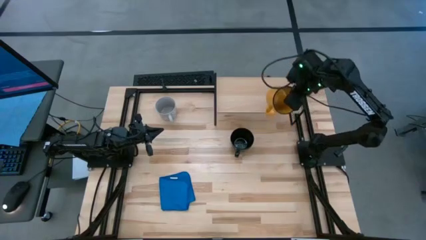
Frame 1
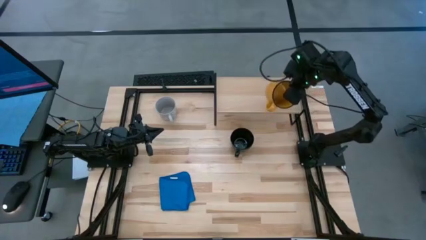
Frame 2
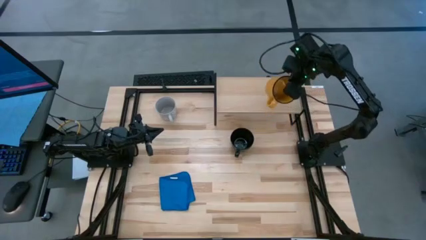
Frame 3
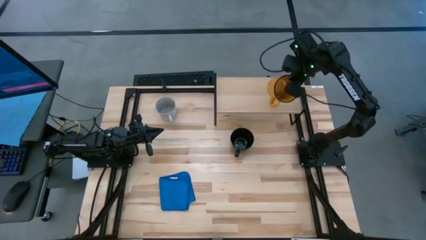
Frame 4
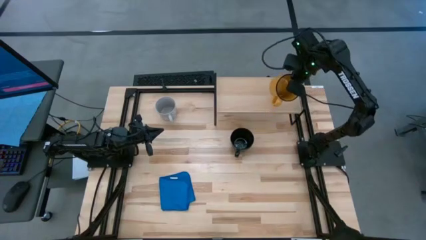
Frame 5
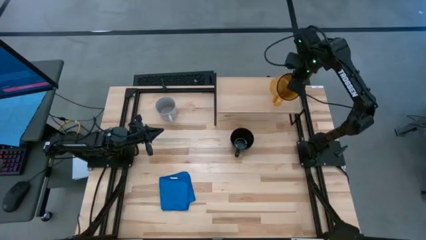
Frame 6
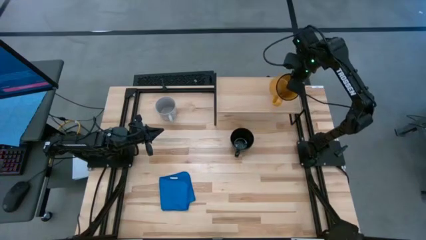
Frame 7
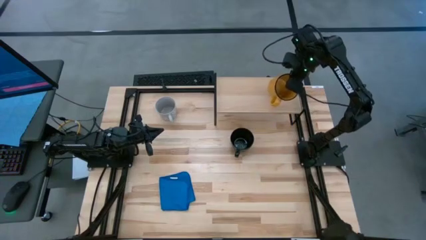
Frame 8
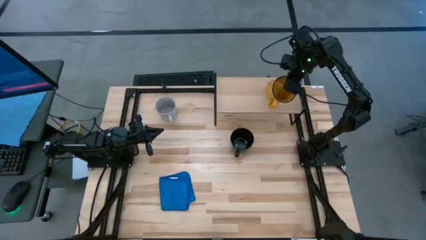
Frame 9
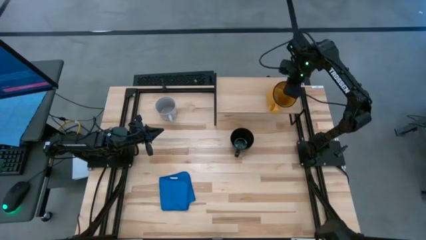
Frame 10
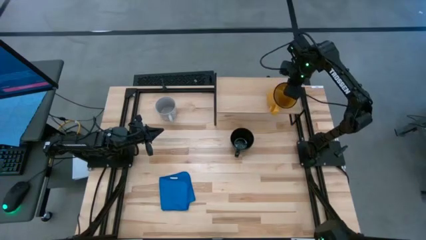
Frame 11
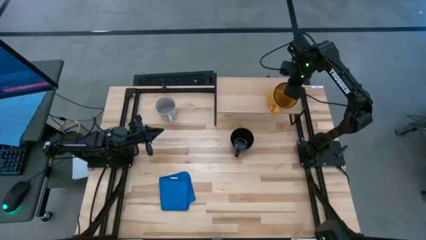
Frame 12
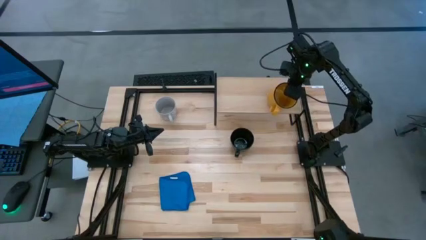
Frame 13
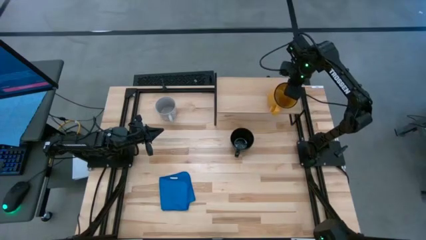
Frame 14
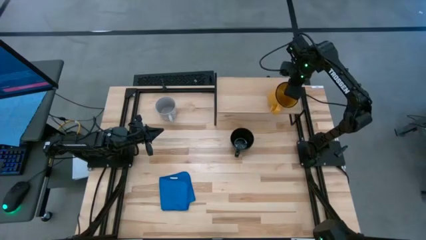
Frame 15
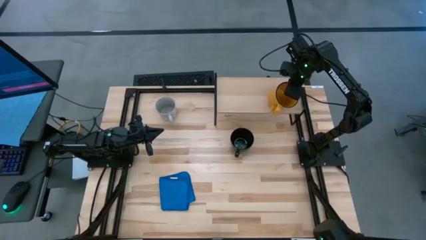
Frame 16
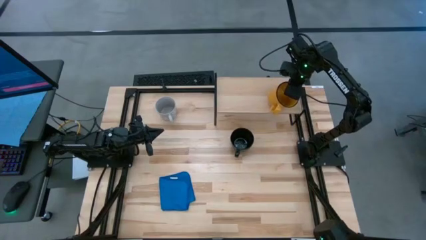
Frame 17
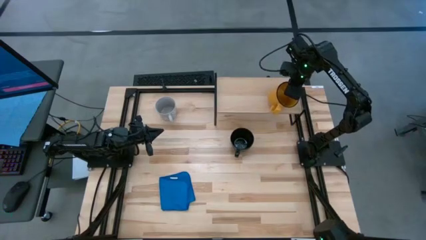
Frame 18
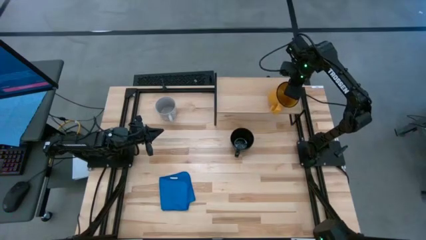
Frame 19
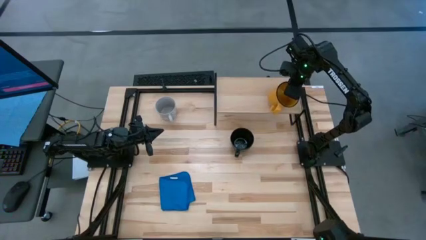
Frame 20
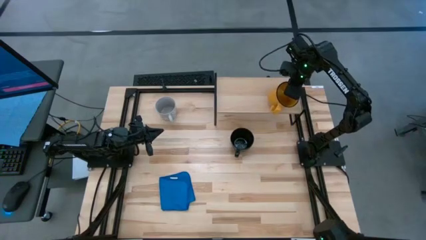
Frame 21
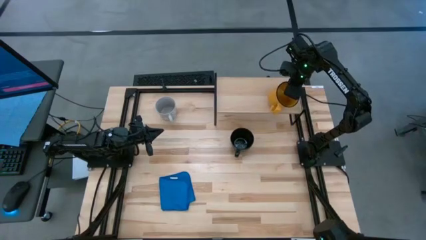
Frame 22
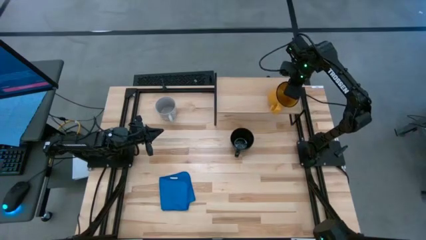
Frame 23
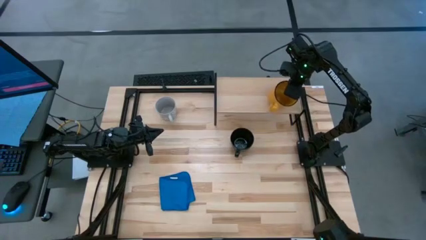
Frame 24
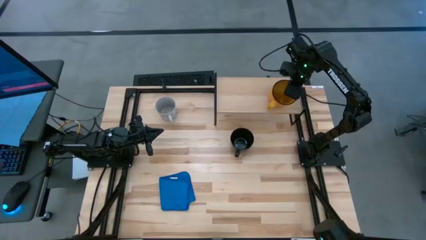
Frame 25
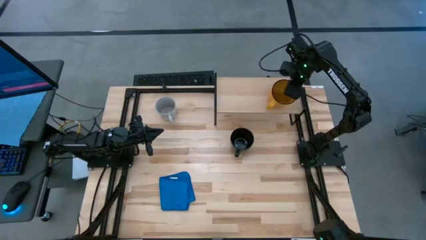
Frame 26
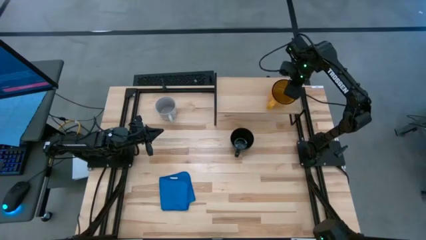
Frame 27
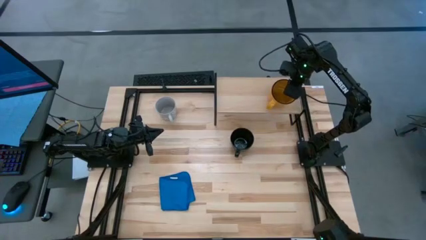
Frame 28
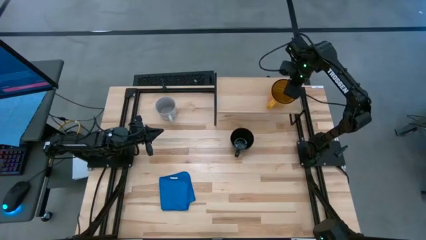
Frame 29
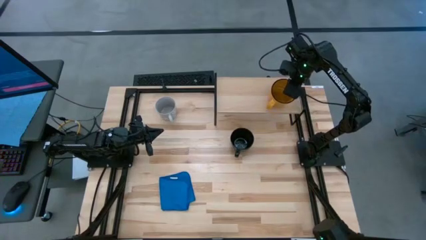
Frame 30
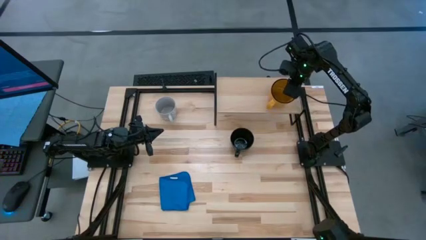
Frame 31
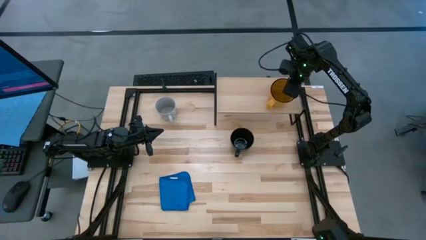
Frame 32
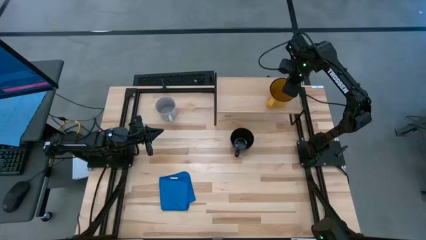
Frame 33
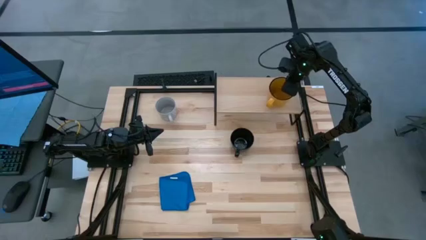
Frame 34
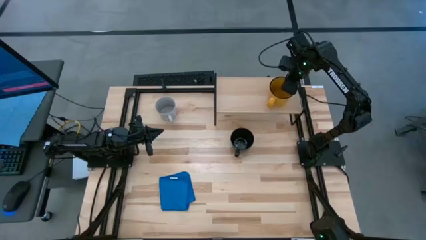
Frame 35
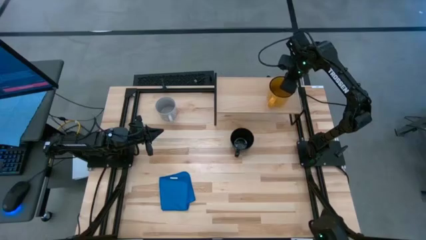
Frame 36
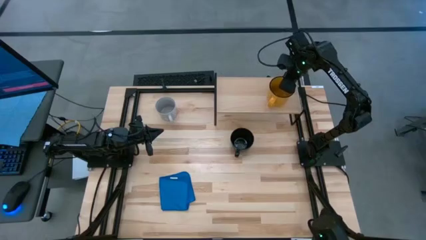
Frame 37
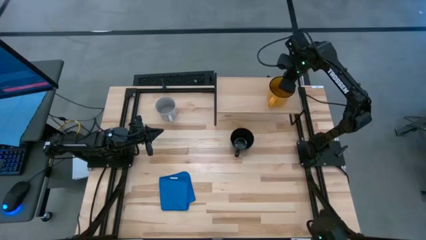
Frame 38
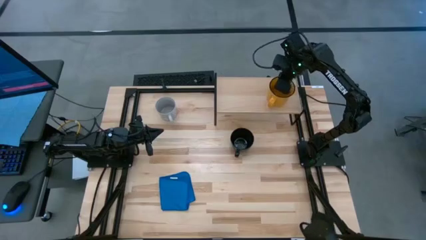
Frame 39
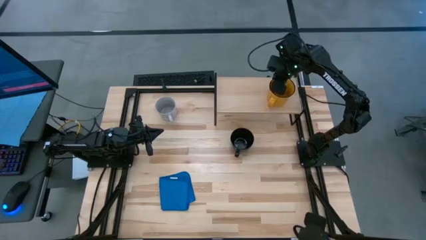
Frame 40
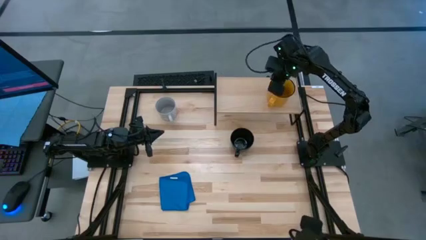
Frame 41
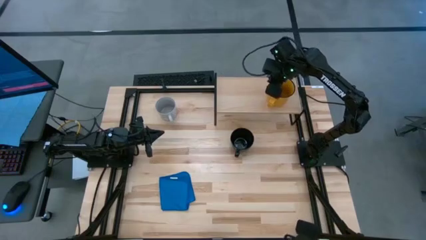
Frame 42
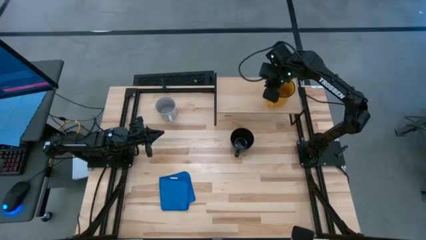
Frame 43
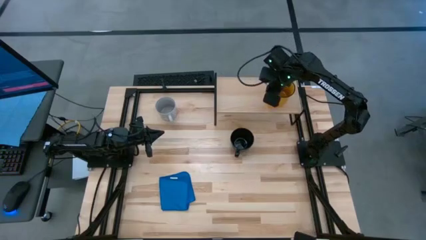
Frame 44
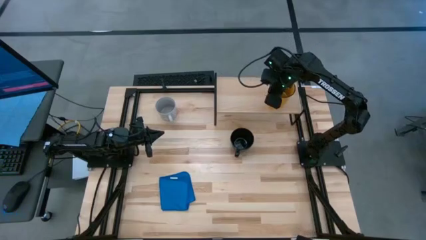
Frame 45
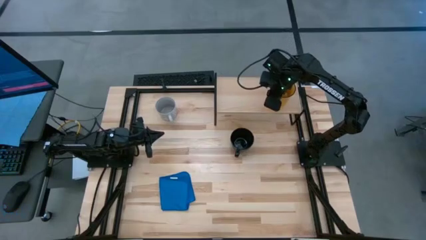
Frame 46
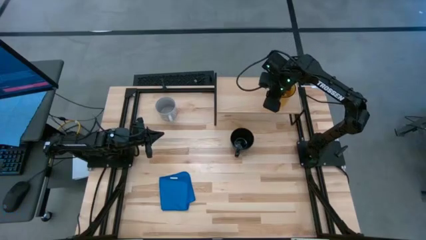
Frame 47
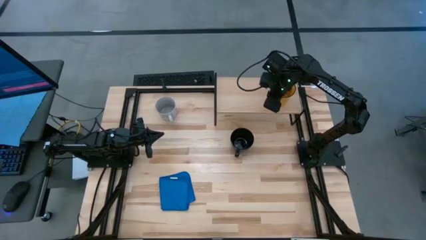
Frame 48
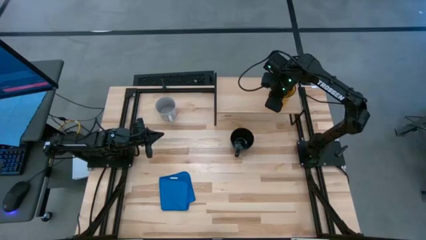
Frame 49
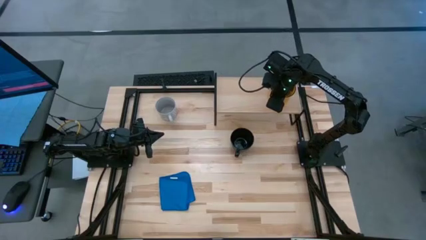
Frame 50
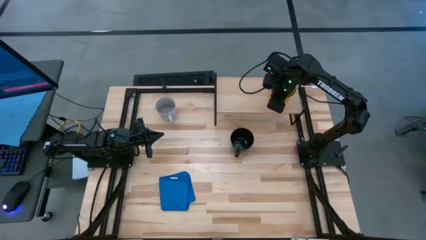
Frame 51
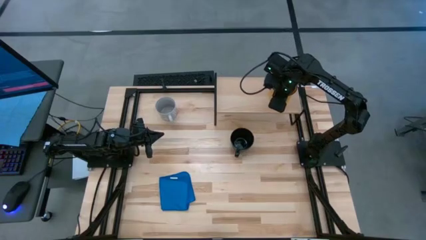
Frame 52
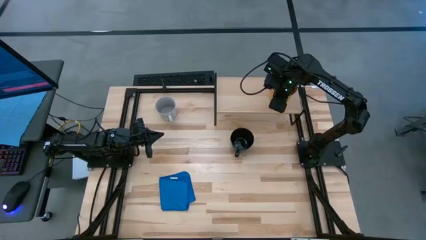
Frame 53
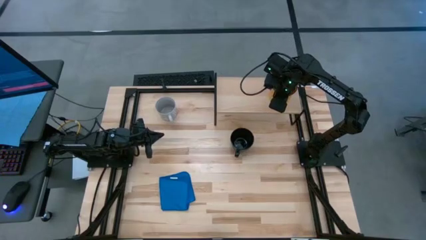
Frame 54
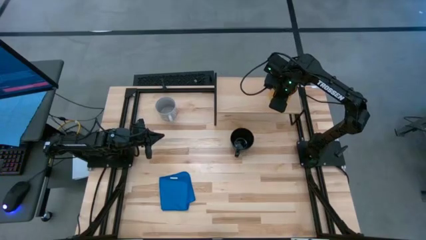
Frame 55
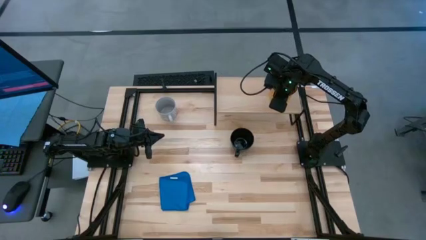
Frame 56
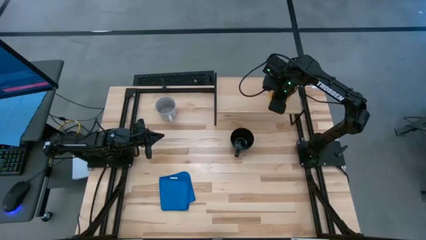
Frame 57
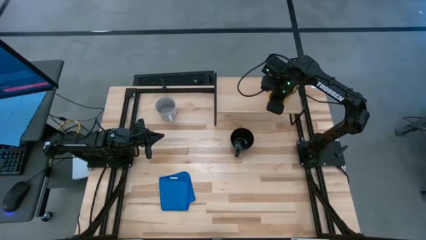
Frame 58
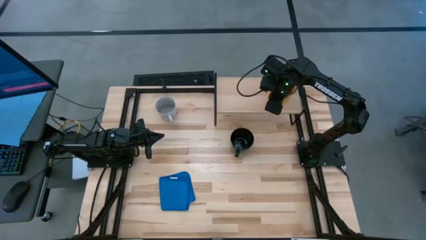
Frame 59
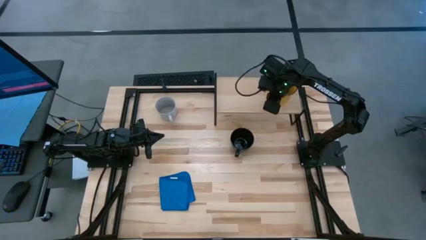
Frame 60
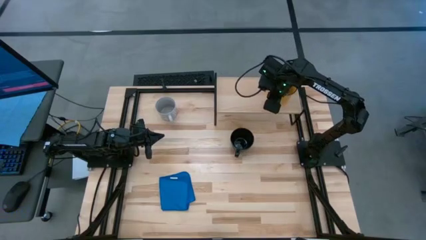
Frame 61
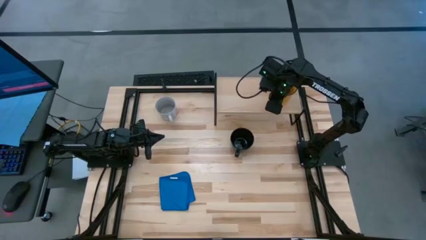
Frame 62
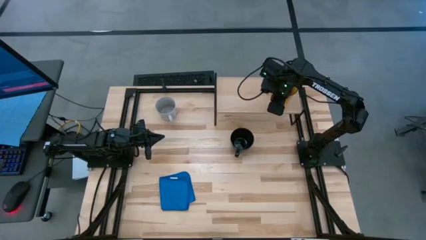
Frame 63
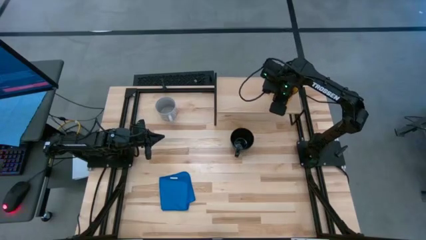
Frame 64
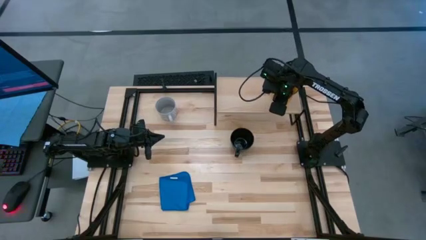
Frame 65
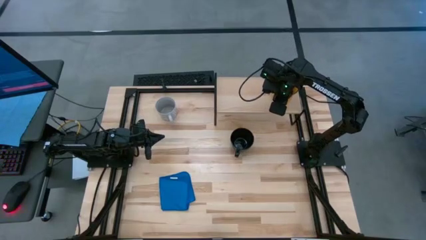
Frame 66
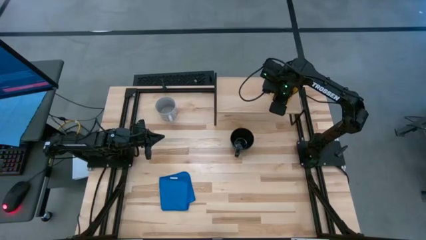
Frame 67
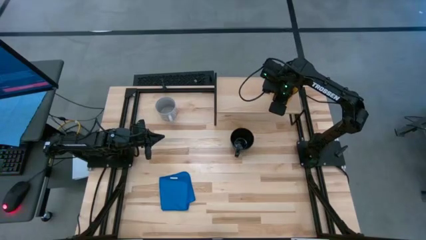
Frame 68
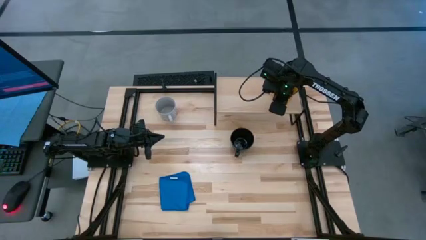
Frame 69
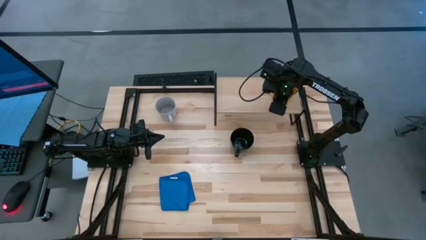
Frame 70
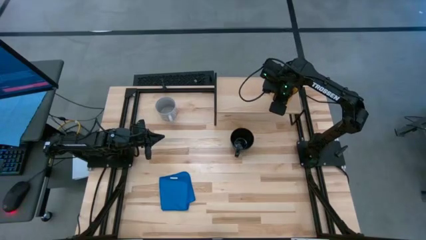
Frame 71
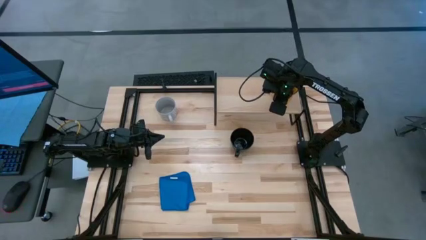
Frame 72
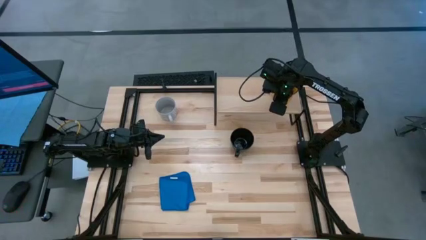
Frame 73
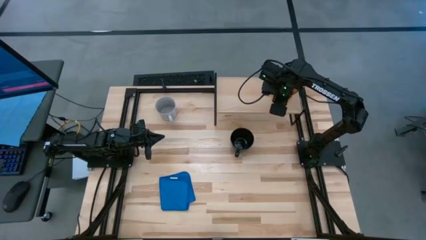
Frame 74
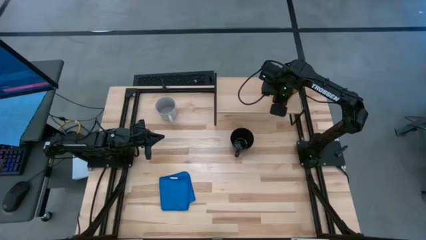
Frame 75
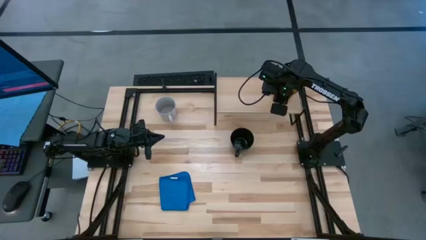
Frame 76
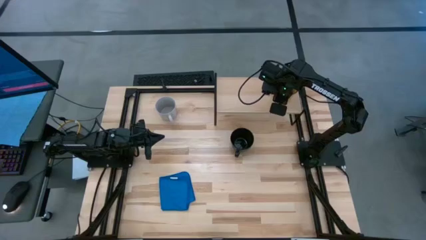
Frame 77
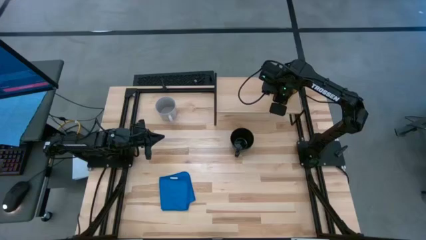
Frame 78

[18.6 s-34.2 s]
Task: Stack small to large cups/mugs on shelf
Put the yellow mug on the shelf
